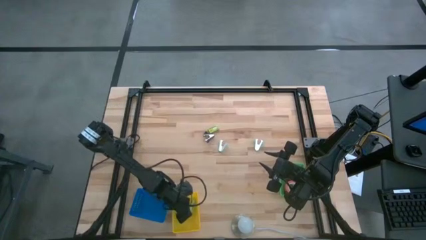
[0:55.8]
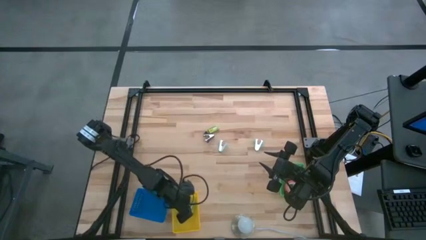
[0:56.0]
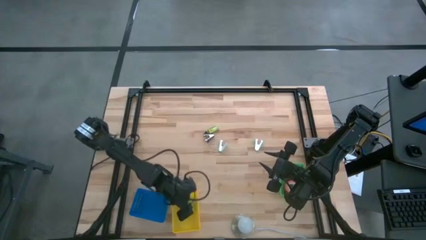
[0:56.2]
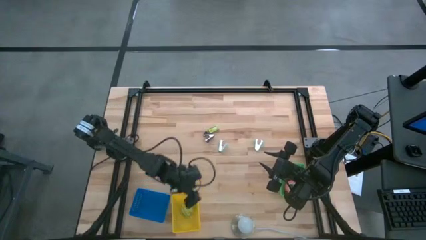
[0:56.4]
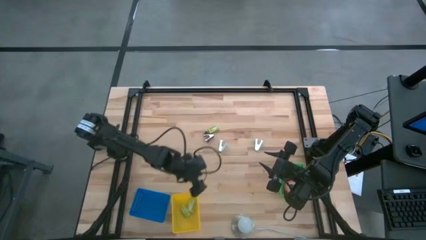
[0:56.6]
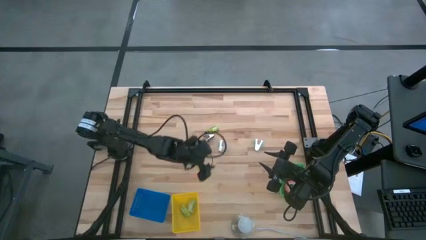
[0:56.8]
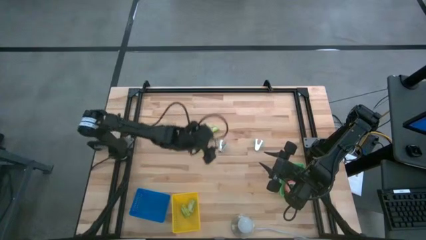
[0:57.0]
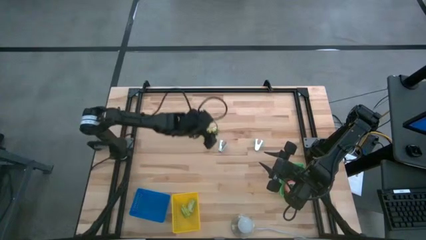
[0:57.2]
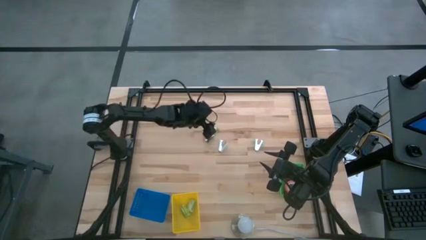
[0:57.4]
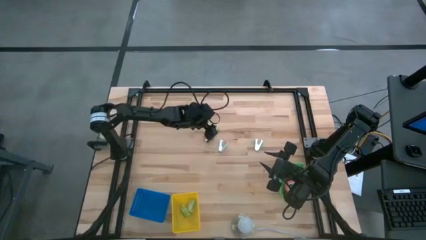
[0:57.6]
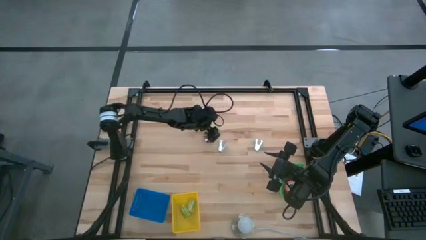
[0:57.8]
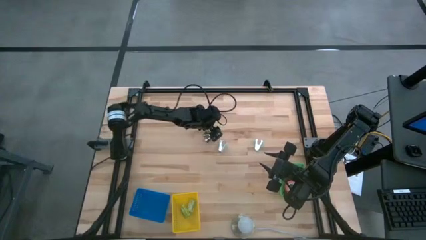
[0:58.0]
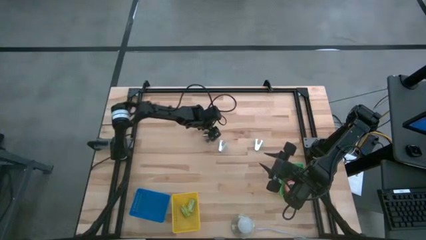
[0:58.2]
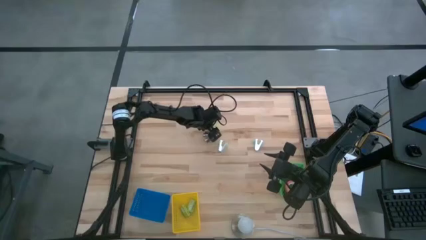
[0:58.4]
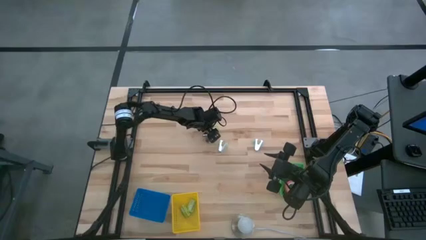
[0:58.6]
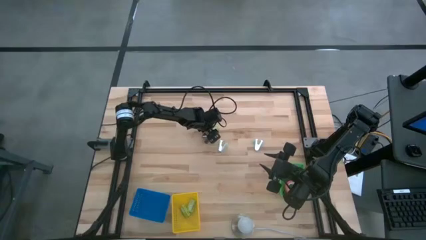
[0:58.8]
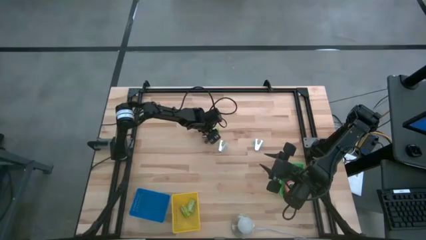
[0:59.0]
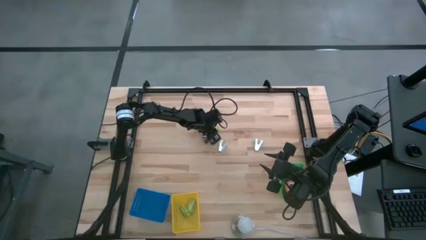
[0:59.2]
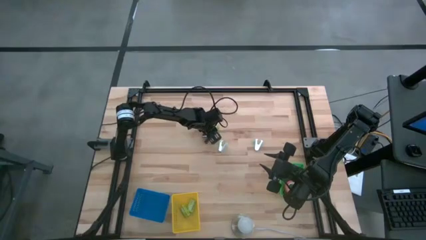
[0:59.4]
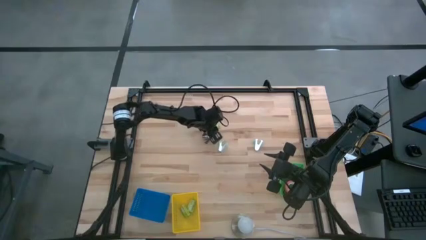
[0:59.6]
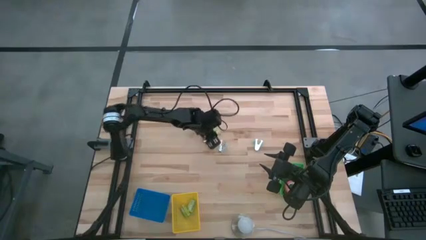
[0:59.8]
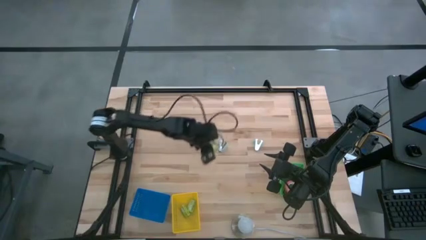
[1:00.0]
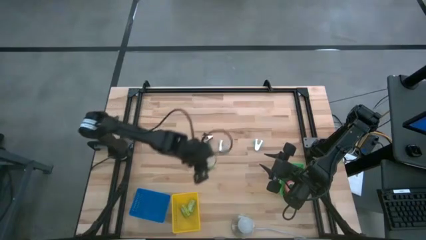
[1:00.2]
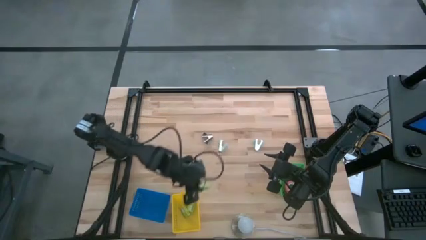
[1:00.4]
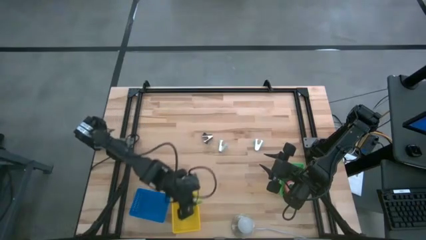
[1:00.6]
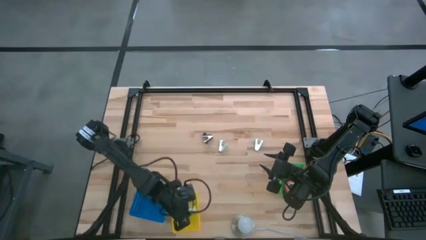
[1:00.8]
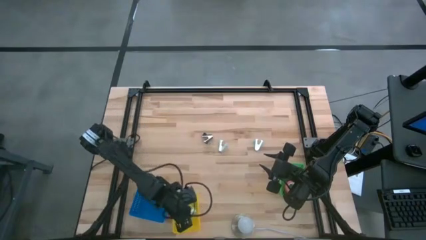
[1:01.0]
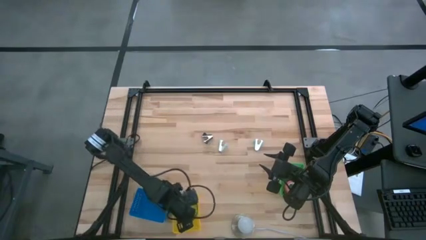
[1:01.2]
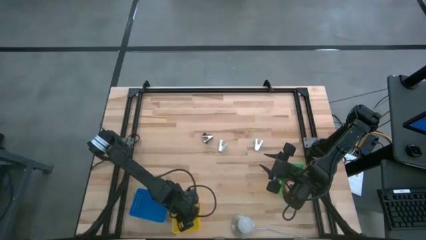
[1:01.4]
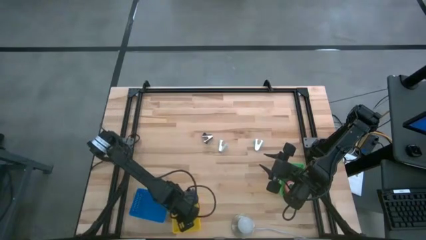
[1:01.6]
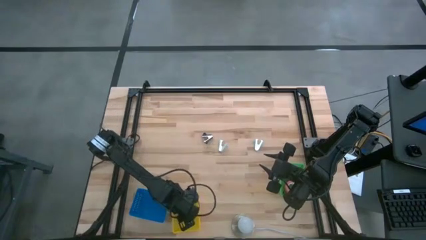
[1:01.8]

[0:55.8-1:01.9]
Task: Pick and place Stapler, Stapler remover, tape
Put the green staple pin box into the yellow basket

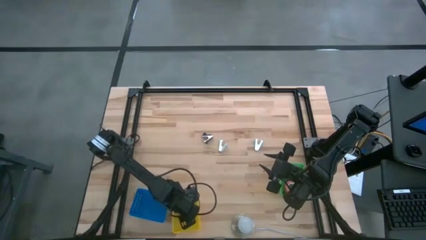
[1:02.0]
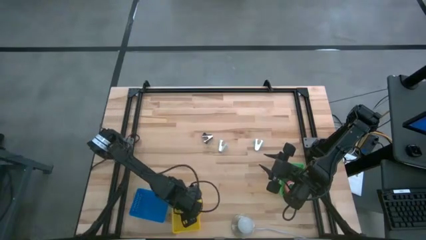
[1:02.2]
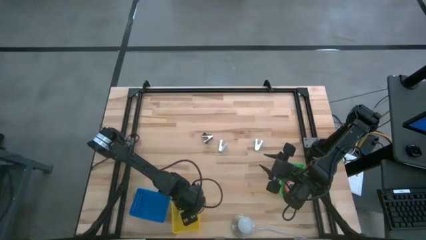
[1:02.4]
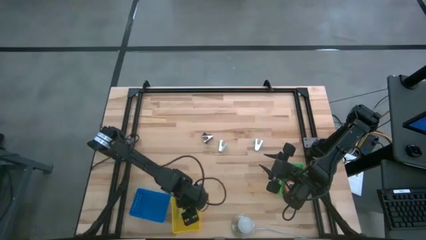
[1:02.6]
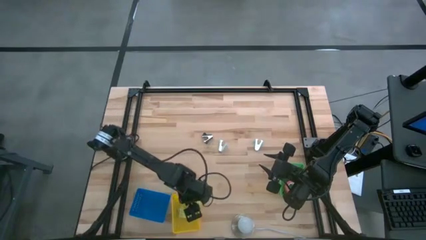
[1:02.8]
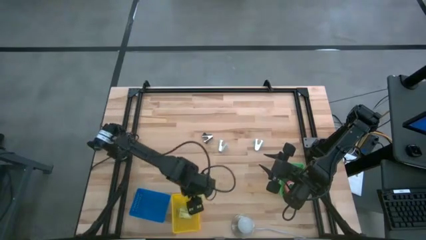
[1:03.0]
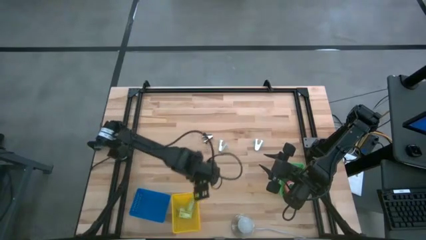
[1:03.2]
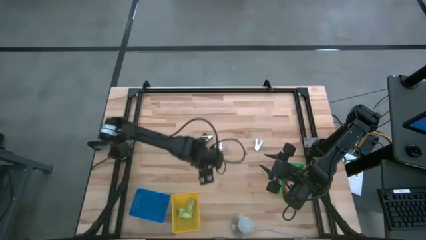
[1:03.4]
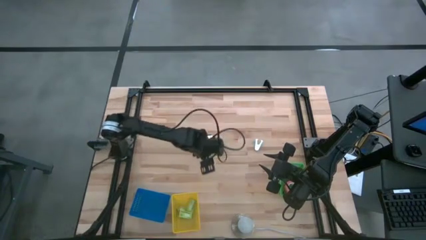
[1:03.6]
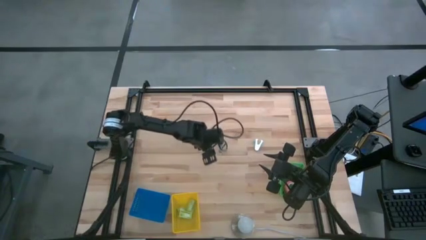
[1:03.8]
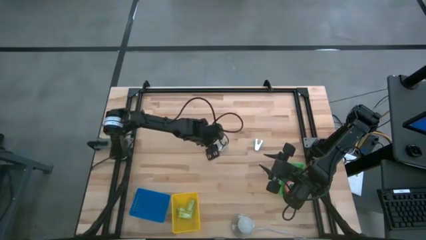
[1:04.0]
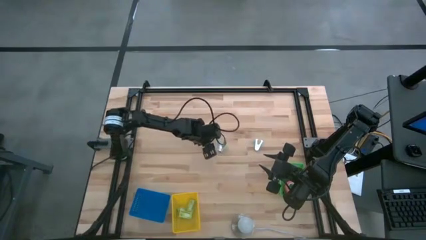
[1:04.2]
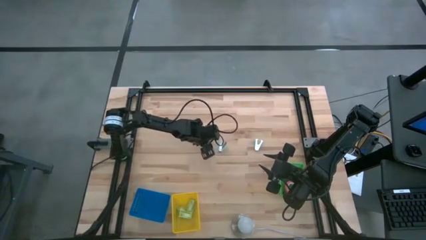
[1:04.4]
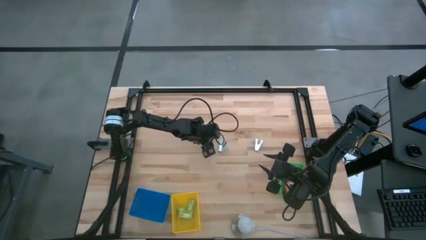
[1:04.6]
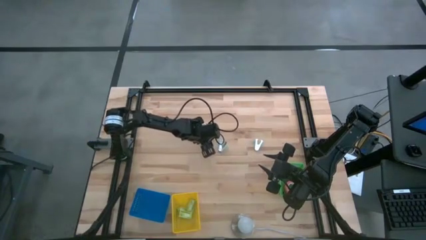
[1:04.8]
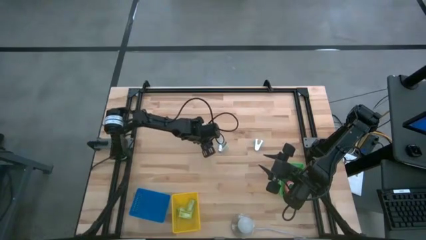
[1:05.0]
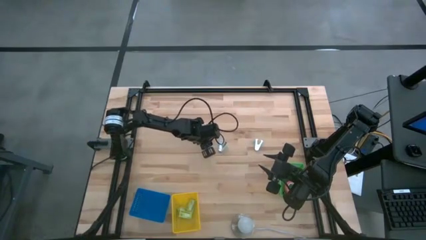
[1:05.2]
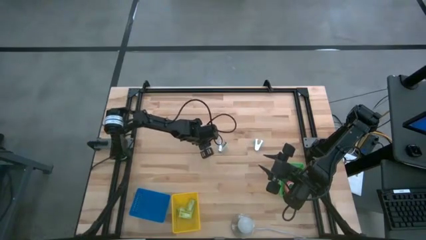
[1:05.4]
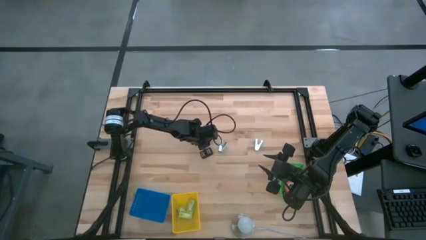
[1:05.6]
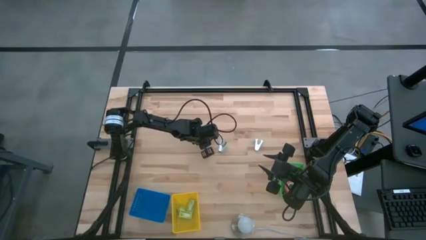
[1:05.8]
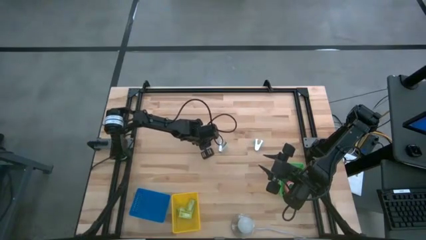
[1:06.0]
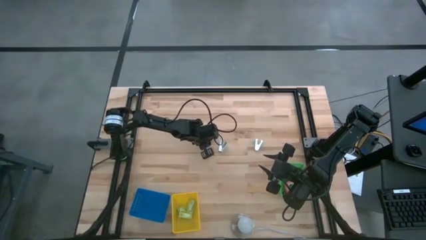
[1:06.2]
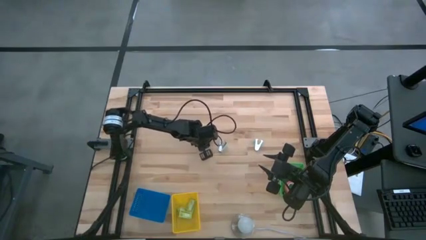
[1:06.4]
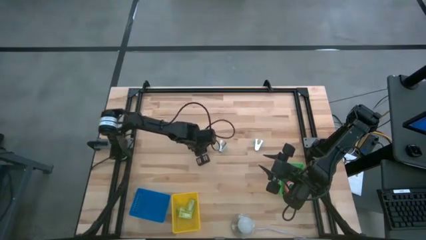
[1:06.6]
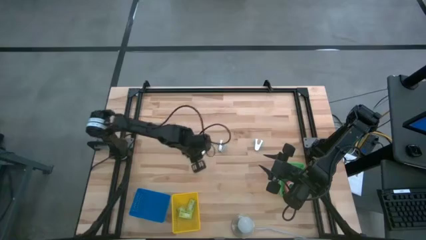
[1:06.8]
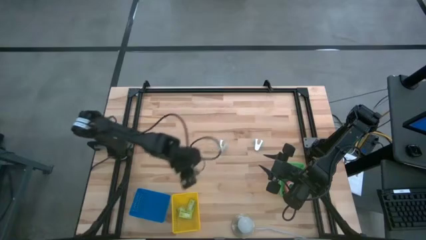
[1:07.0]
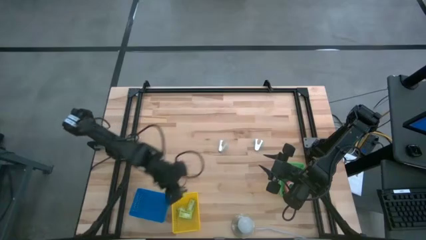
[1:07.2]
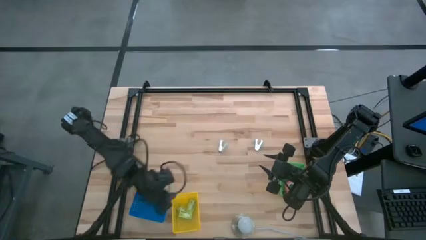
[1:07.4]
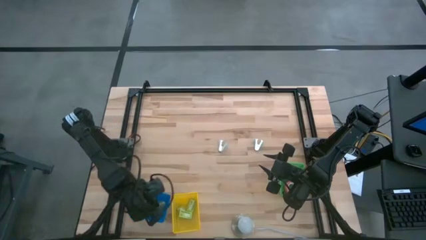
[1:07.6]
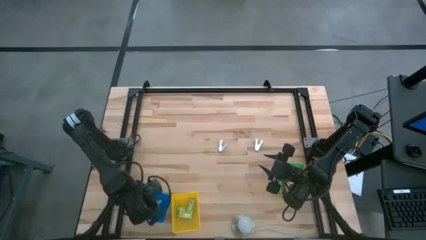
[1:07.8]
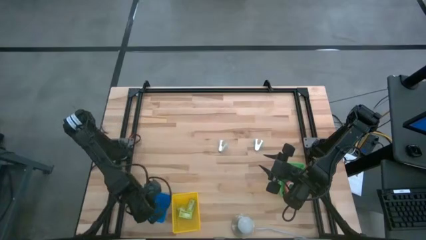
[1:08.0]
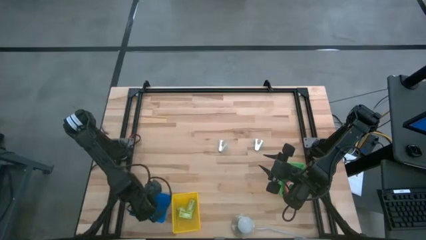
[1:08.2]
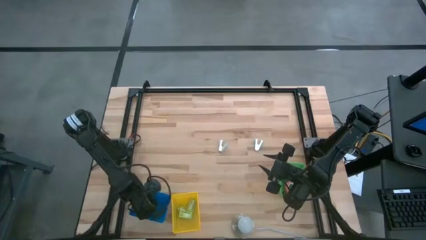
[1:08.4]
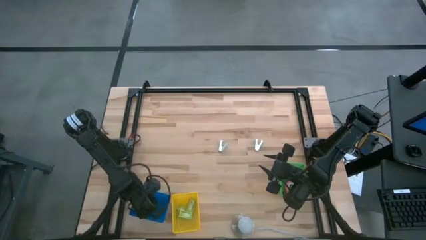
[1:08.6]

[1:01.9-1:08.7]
Put the black staple remover into the blue basket
